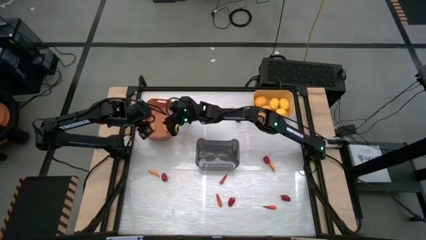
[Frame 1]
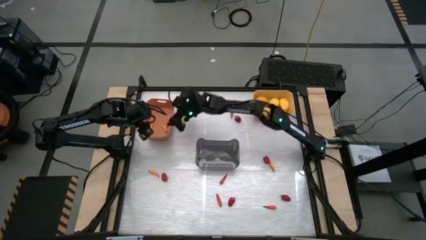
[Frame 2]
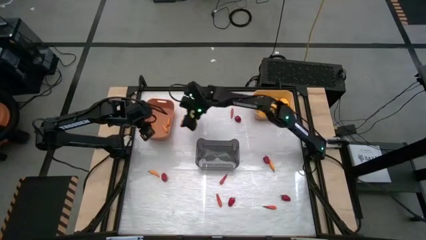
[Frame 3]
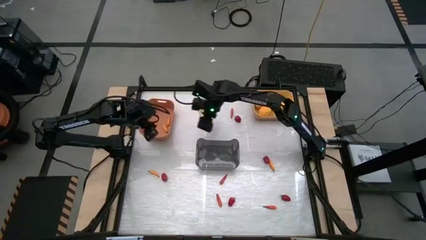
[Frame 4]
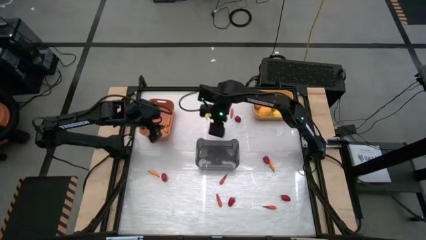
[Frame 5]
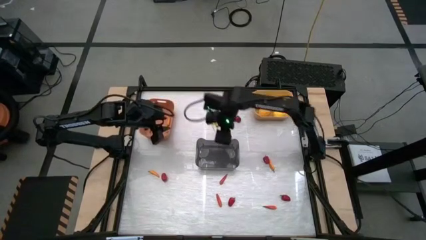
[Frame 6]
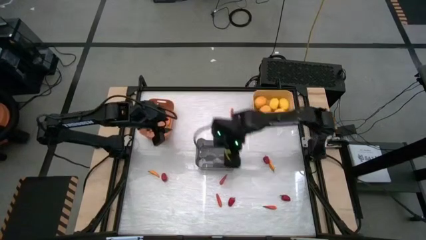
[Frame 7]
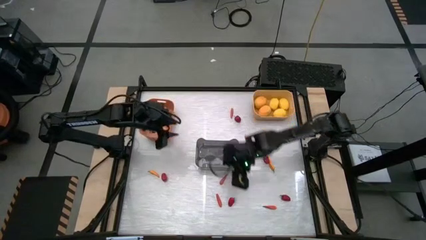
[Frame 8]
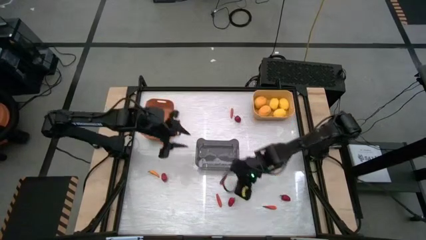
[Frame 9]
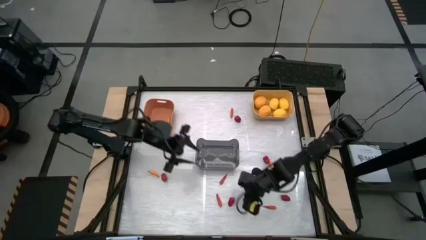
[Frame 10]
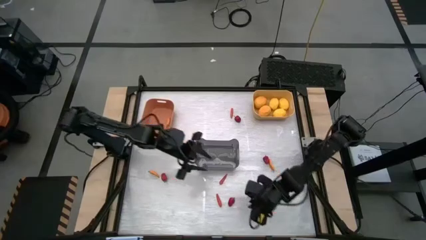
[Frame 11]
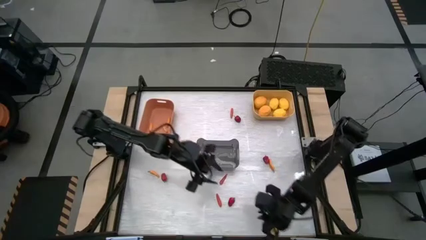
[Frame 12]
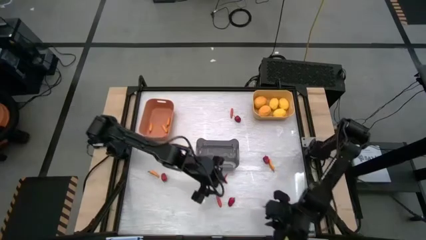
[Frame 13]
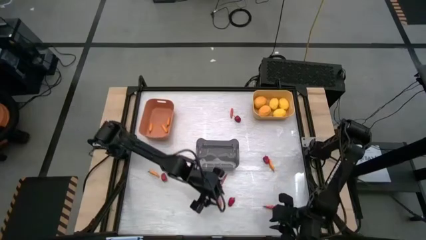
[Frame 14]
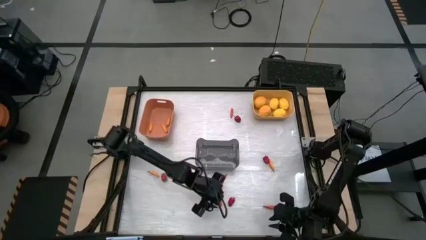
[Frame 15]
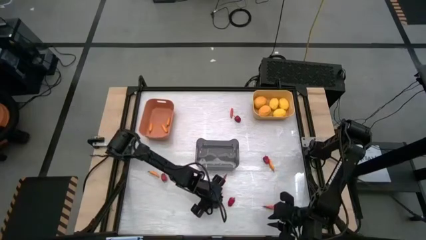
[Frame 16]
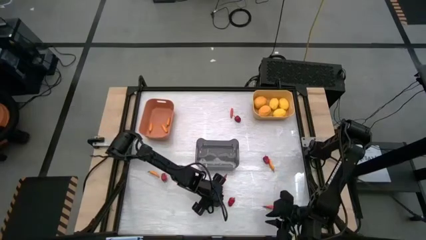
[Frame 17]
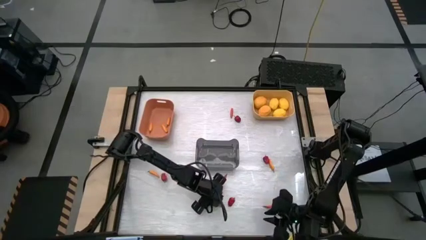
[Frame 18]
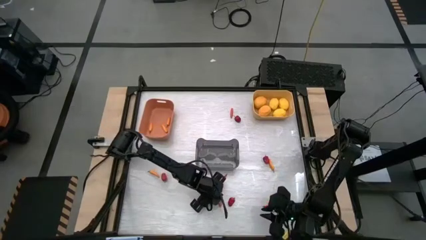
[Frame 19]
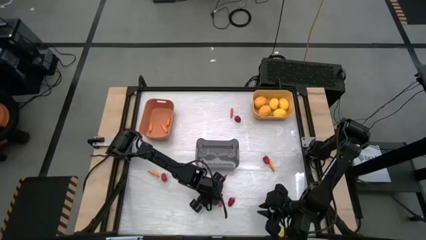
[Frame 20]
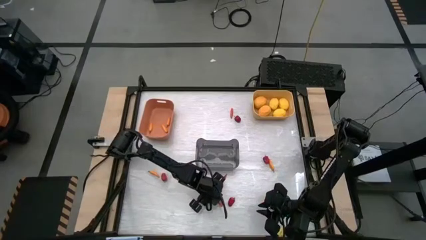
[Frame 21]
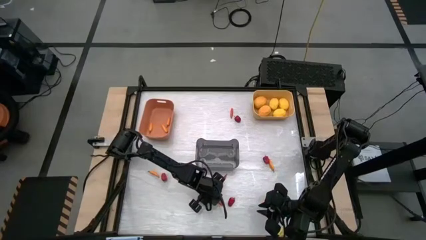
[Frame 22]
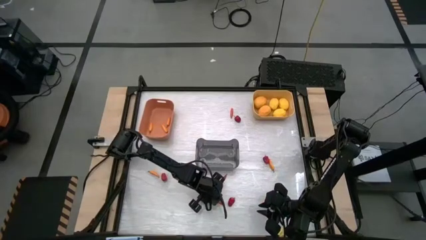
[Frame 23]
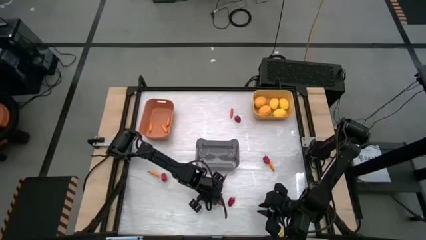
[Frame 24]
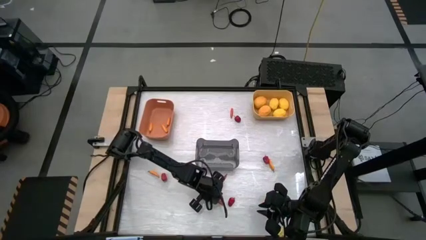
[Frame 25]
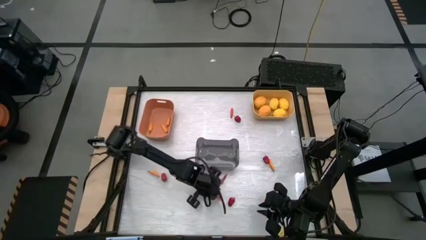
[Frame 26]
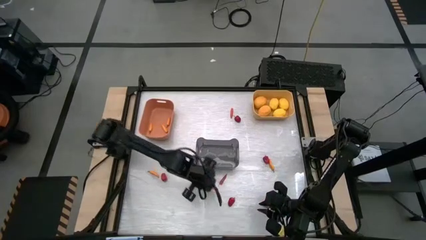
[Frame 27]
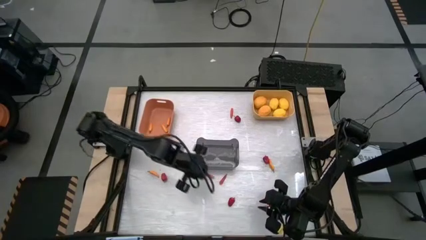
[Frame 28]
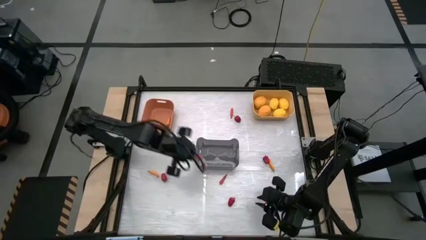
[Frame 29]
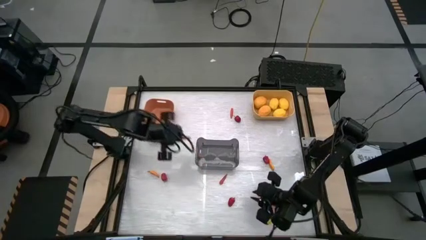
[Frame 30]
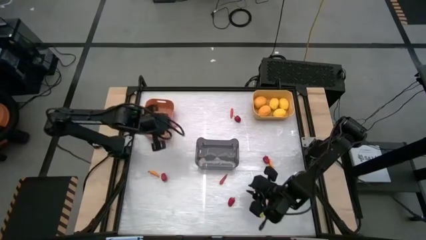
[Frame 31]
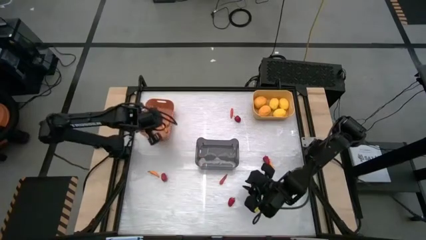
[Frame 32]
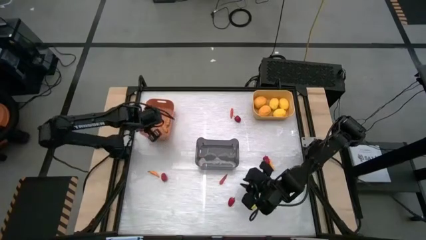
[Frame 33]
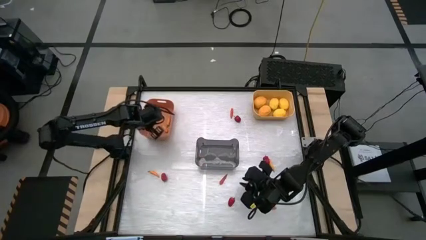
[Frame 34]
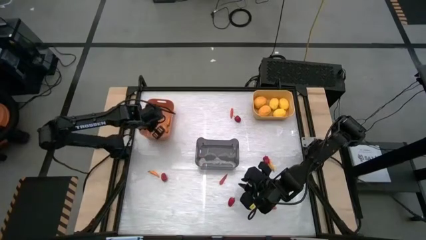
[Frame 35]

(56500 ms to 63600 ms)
Task: Sort produce into baskets
Put the orange chili into the orange bin

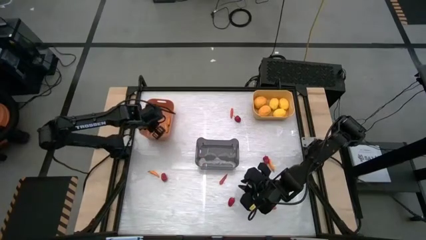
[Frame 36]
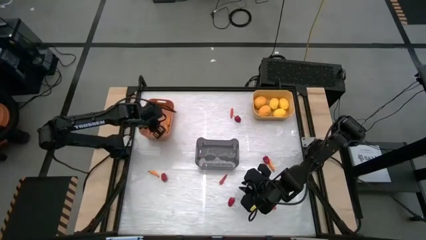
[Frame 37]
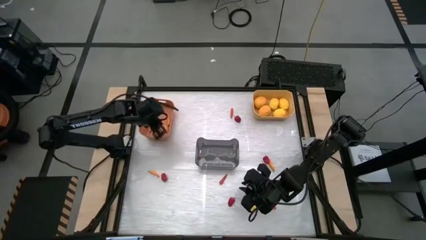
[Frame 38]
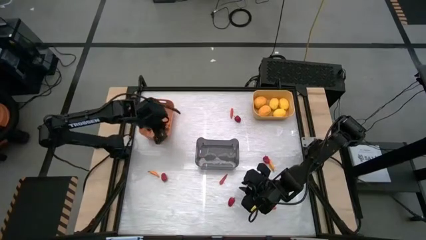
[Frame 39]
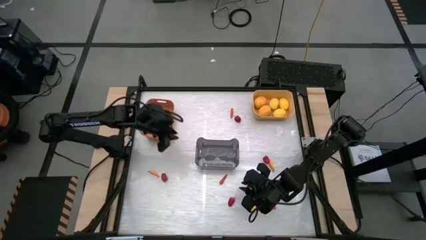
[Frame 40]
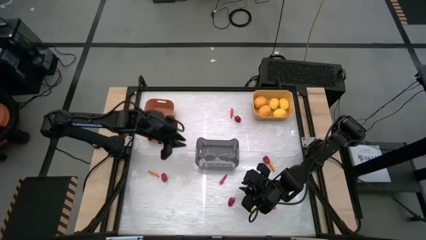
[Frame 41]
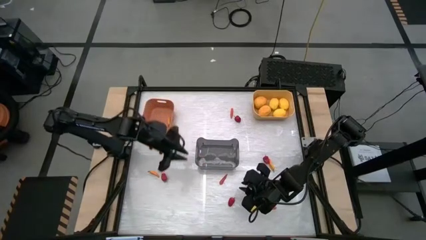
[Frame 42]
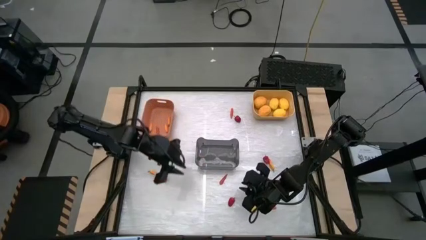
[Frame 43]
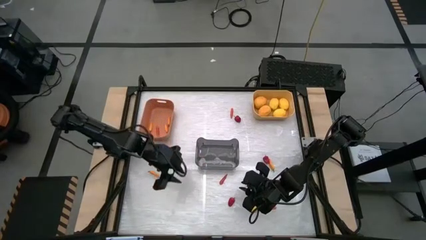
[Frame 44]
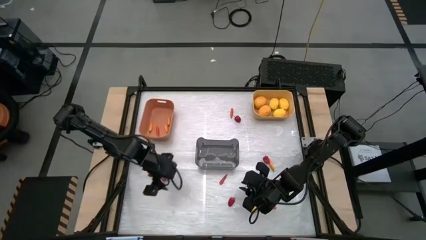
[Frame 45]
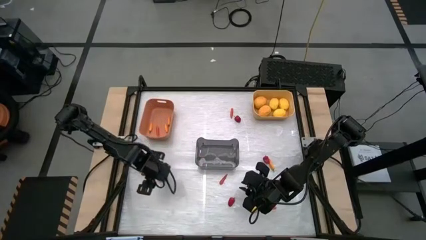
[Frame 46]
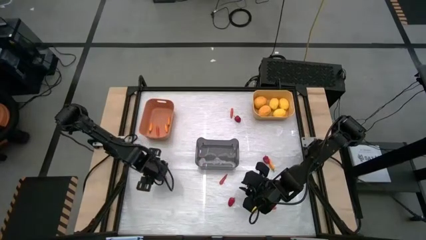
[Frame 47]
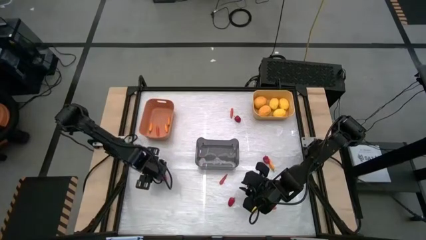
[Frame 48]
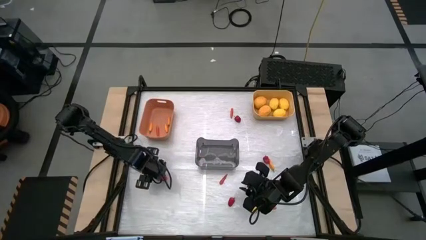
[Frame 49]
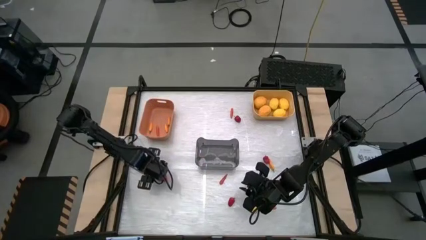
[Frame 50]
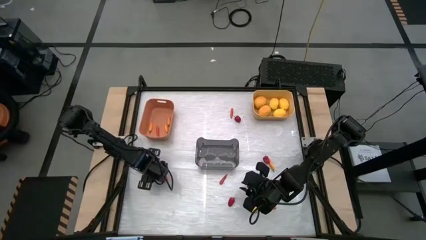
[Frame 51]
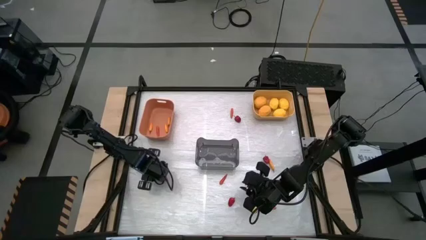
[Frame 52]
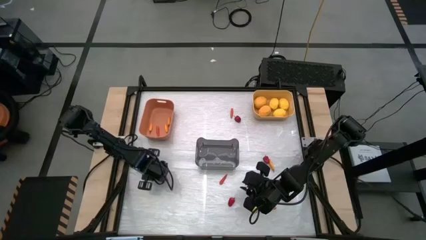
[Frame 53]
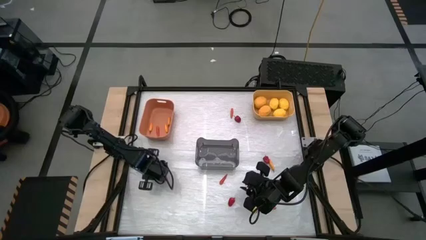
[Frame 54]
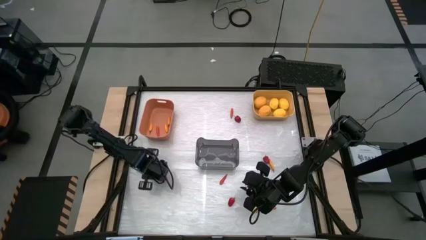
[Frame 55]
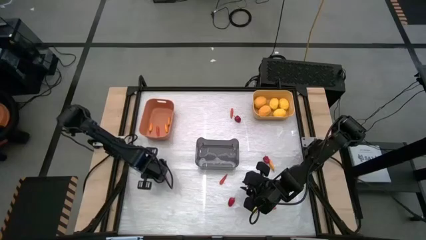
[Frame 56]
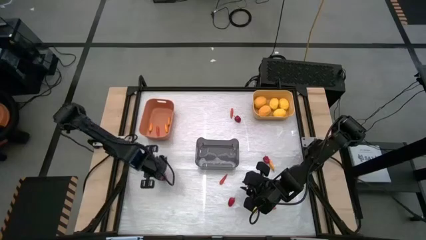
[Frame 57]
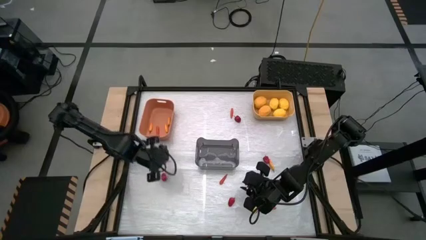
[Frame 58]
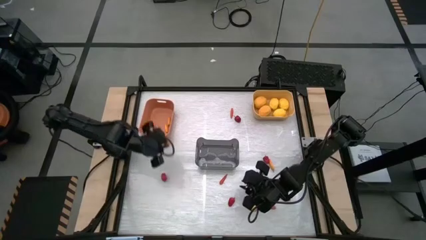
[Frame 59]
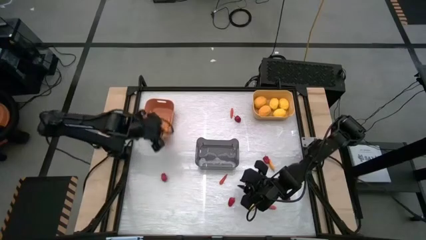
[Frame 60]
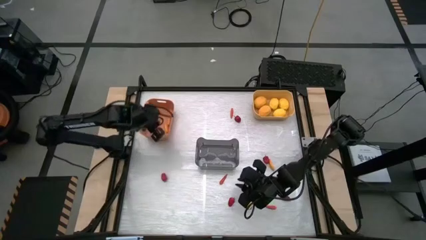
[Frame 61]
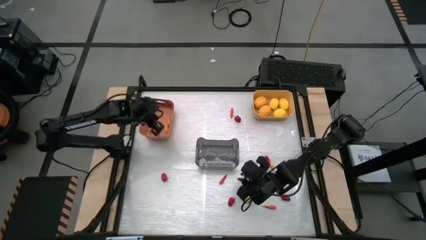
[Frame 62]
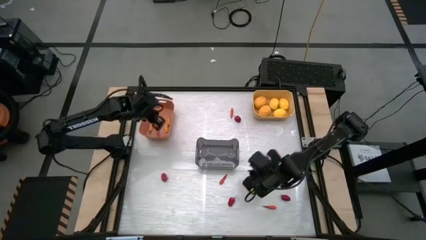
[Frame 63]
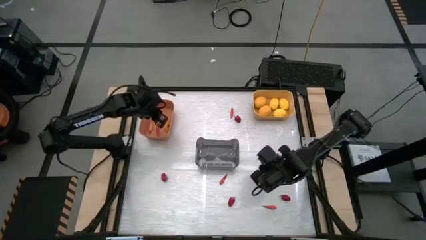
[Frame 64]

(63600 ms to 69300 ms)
Put the yellow chili into the orange bin

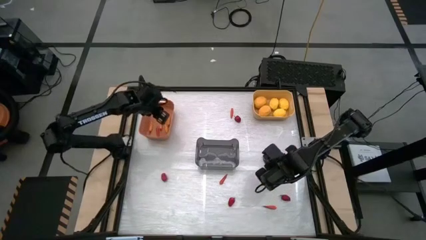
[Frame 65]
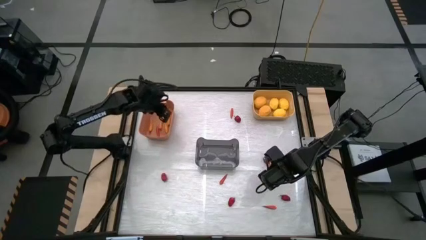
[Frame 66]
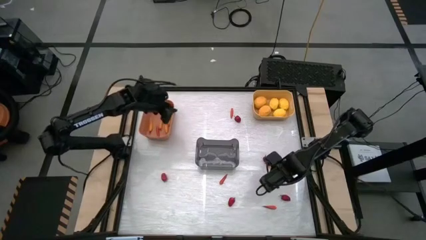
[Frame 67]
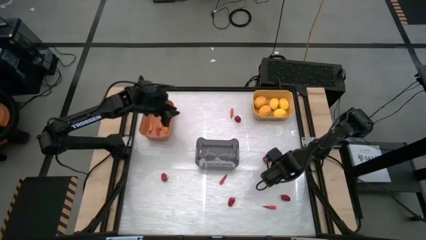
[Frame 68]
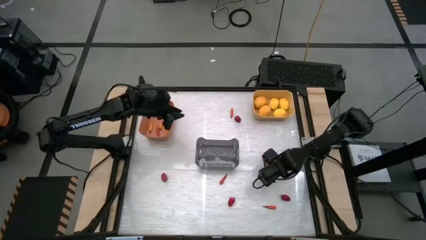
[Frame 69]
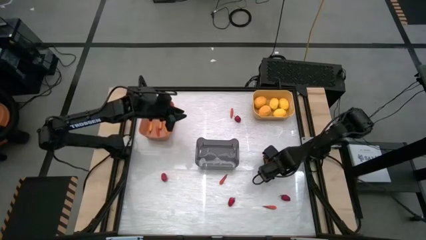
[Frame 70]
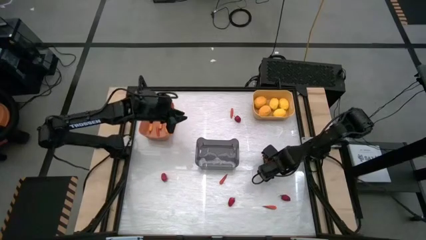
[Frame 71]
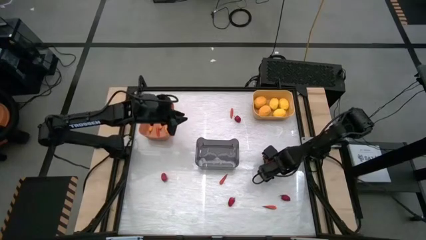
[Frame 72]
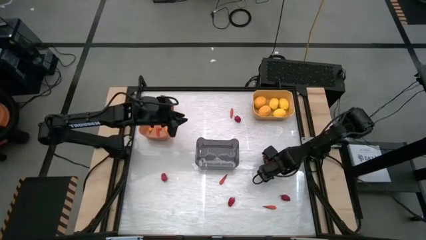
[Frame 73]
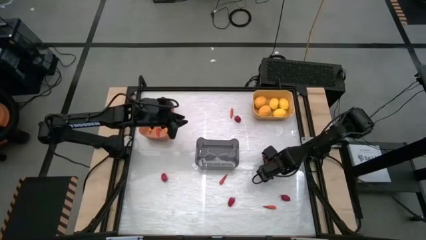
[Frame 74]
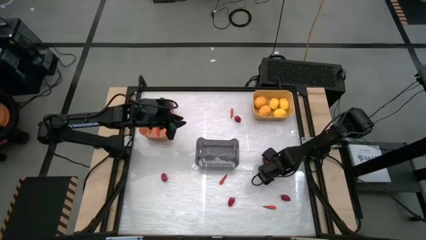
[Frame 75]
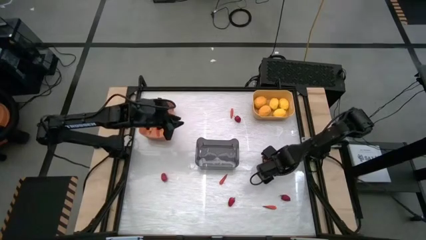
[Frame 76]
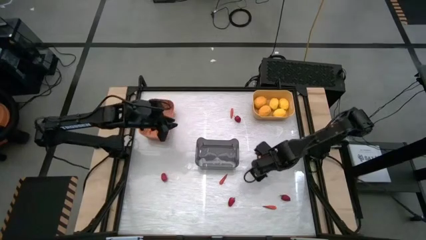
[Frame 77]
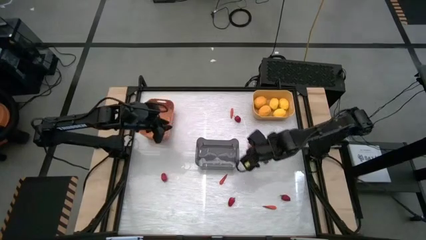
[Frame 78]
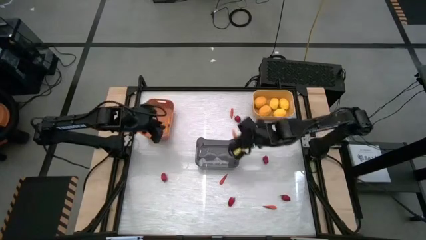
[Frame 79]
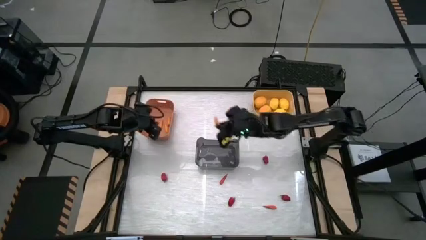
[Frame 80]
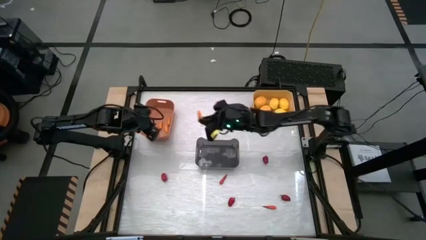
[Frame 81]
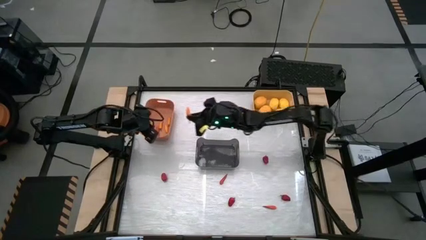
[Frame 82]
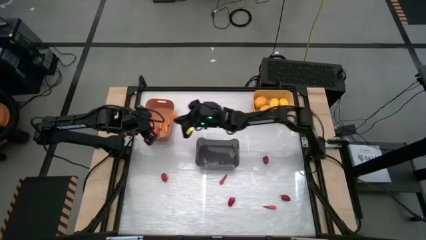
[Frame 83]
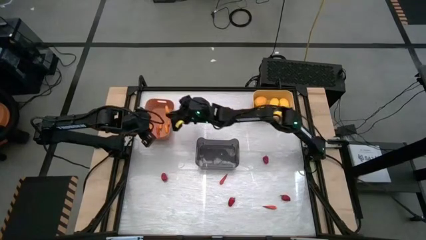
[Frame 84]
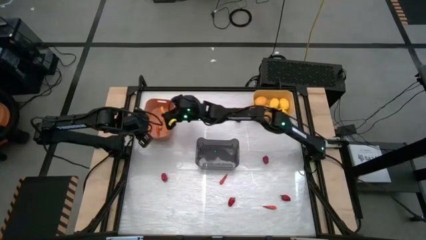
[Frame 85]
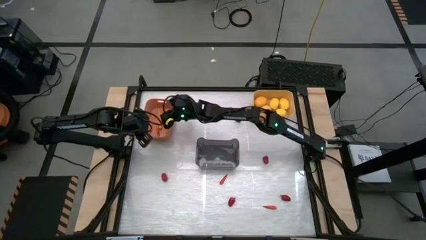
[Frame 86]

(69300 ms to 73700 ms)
Put the yellow chili into the orange bin
